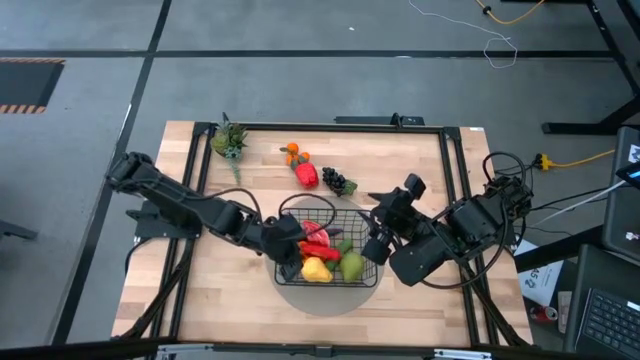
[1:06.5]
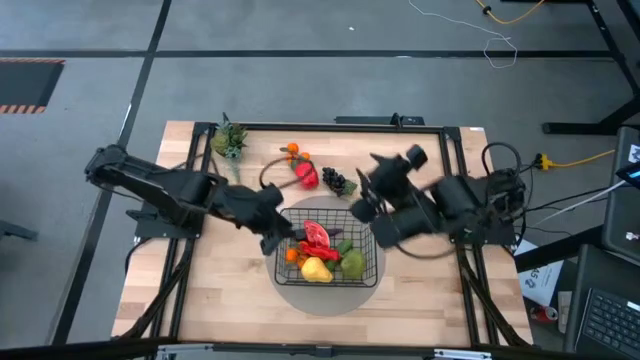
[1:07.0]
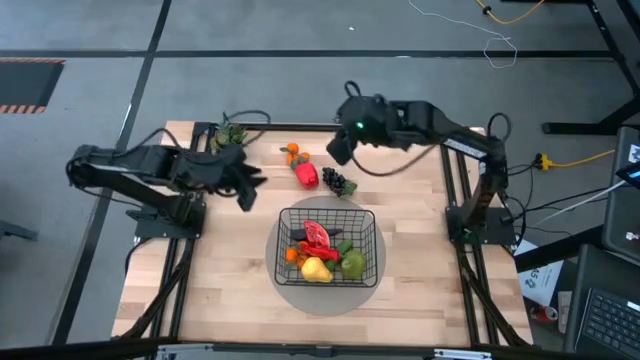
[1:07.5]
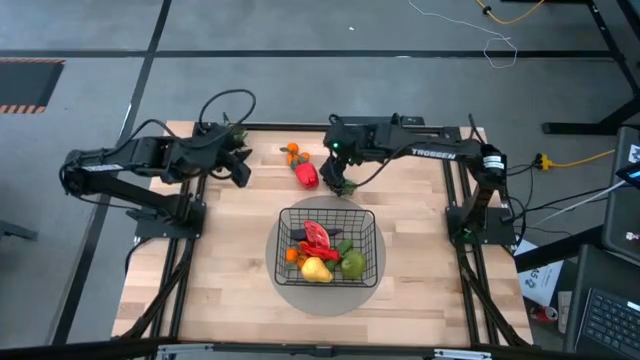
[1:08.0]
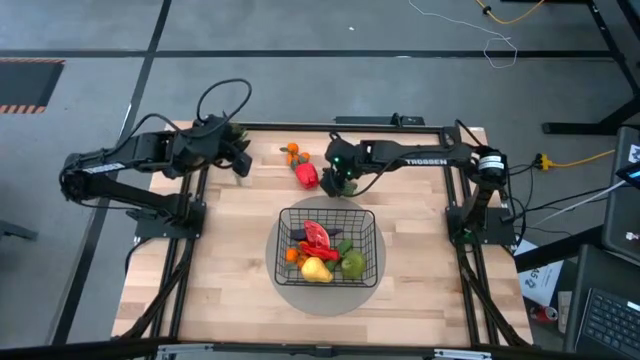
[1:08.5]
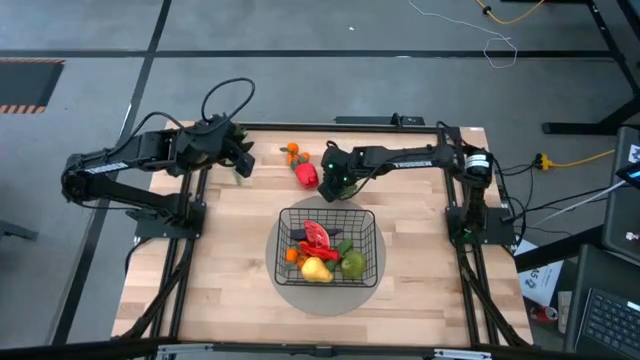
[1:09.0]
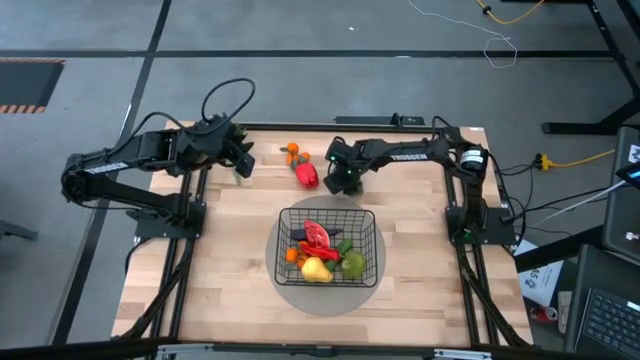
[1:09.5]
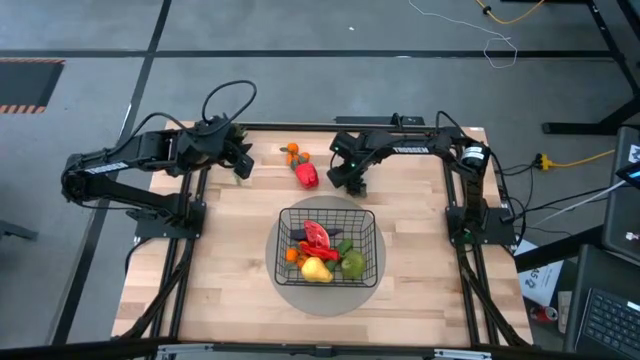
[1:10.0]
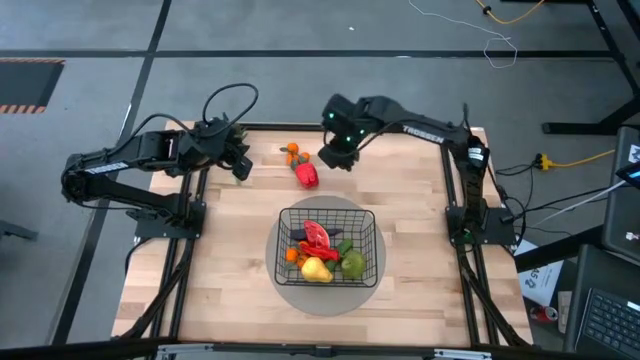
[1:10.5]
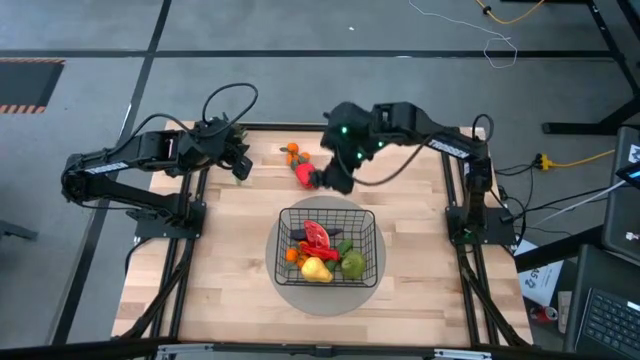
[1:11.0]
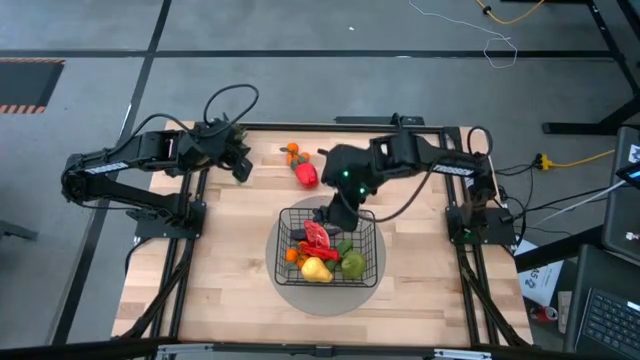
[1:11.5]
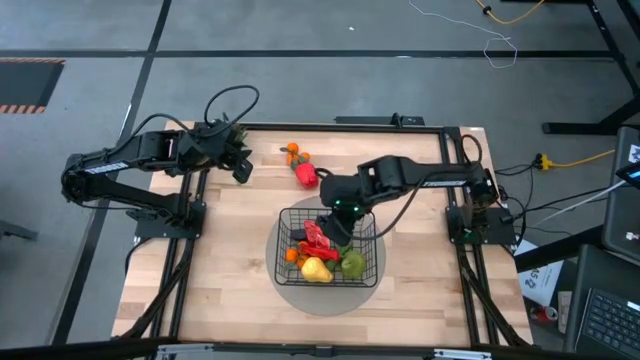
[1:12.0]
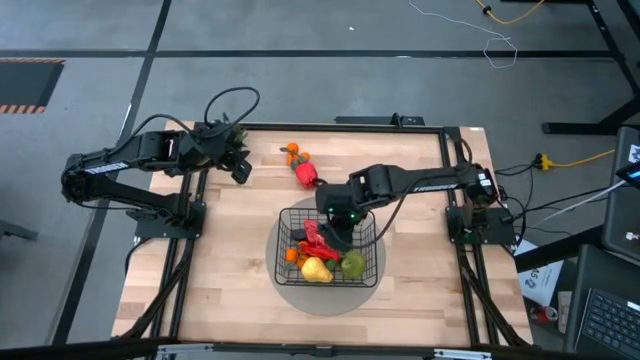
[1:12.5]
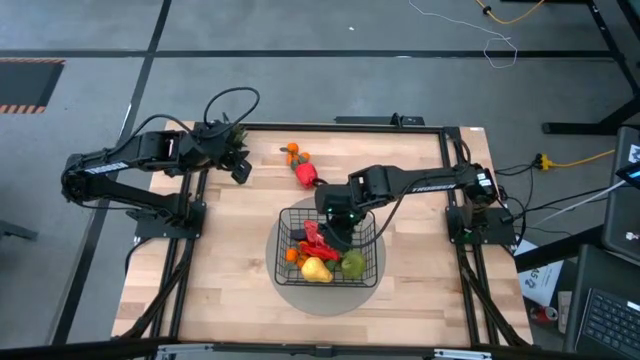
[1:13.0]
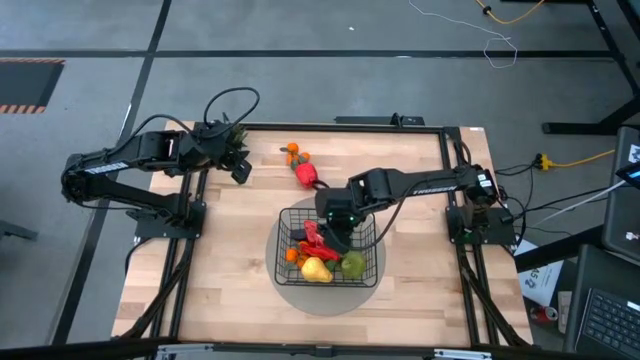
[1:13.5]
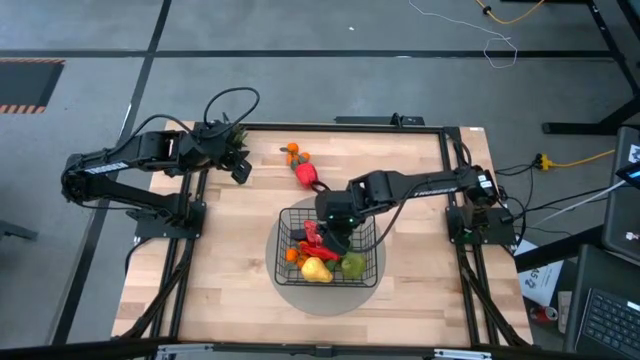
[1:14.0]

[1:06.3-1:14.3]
Task: Build produce basket
Put the black grapes into the black wire basket

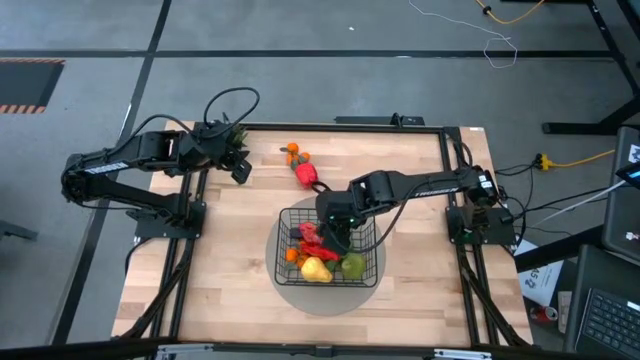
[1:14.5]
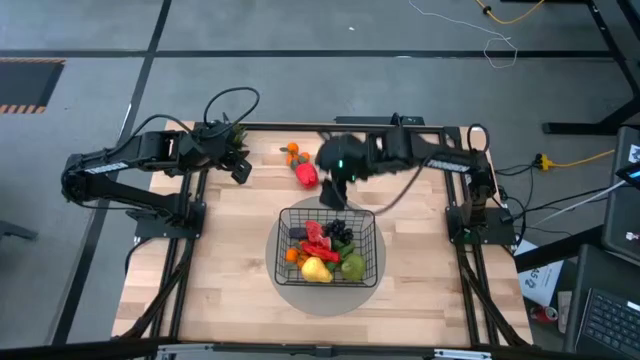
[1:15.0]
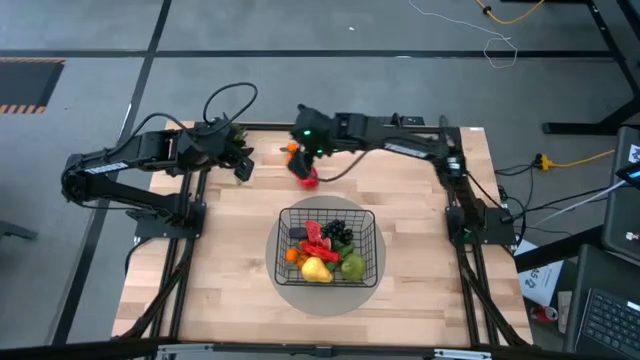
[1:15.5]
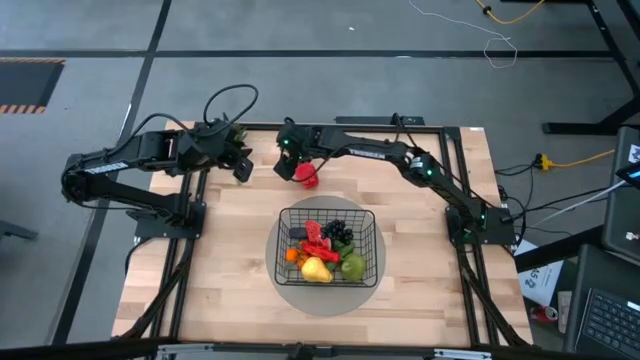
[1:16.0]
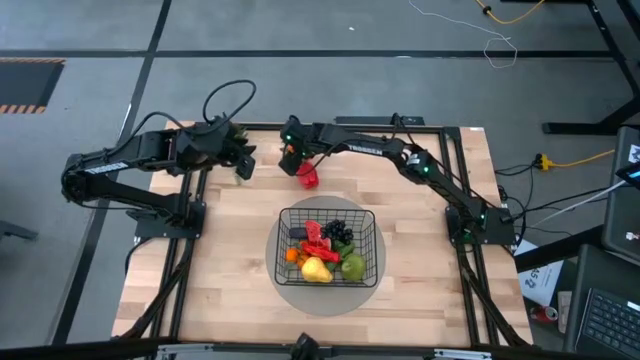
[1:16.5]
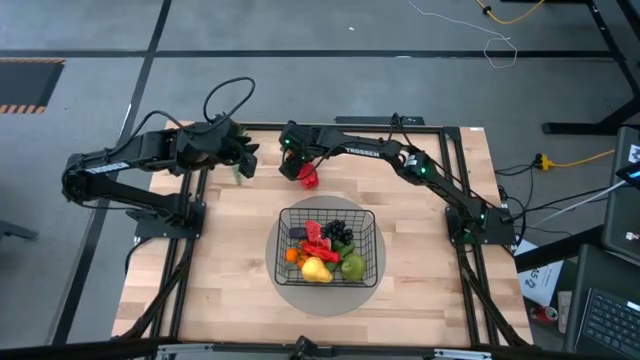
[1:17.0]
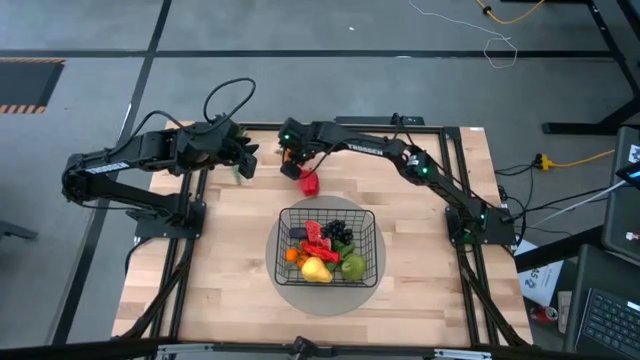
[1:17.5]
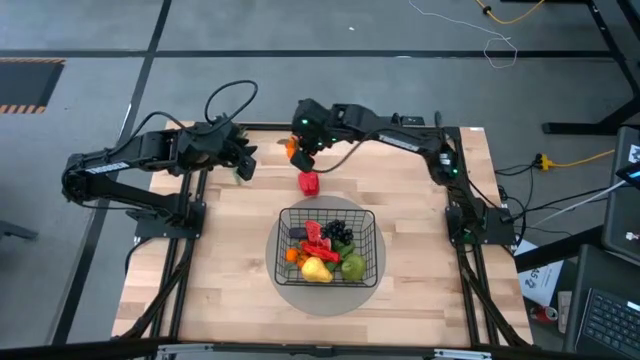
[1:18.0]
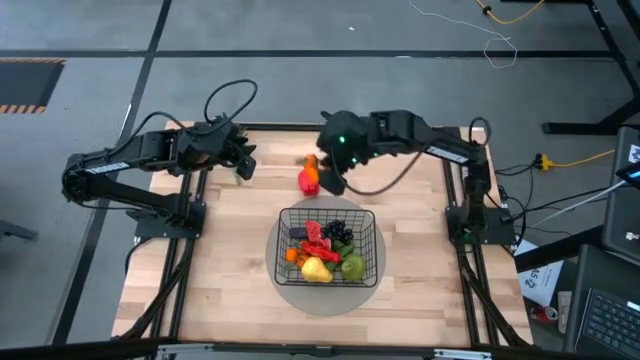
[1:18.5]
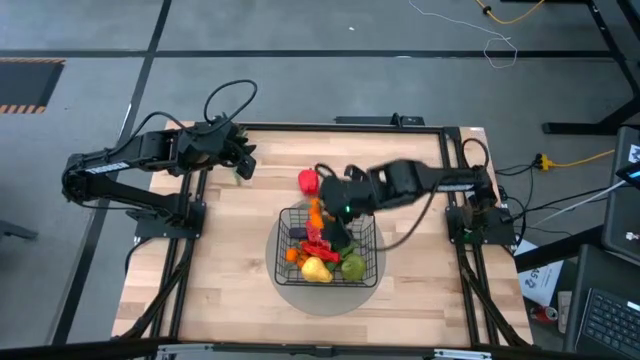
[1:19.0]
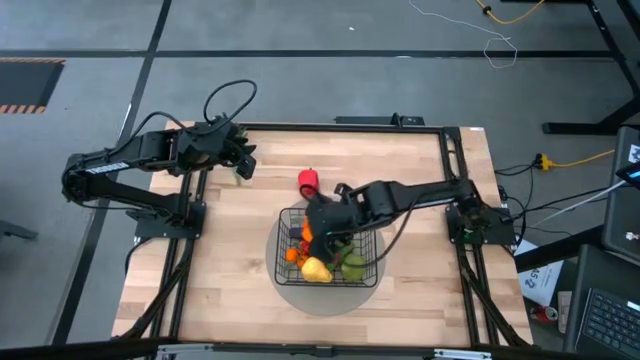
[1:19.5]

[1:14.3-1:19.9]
Put the orange tangerines into the black wire basket

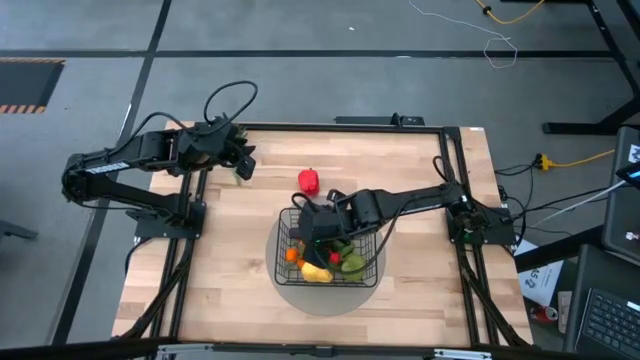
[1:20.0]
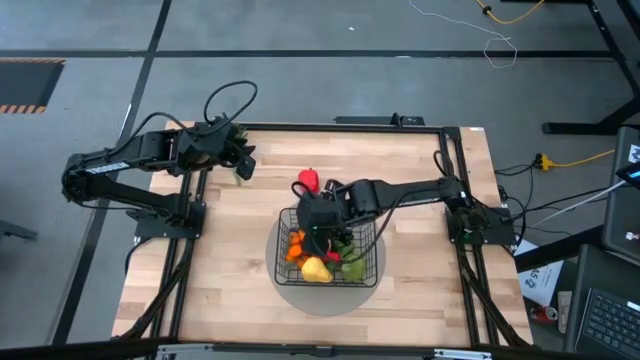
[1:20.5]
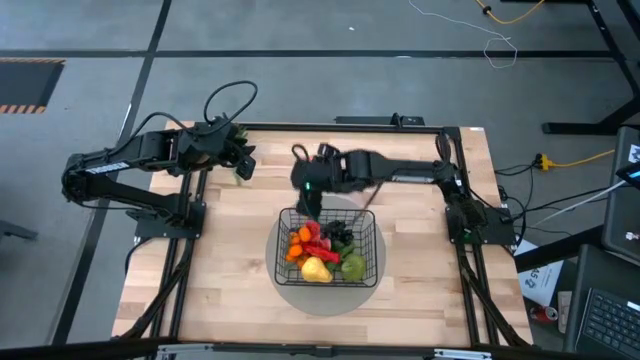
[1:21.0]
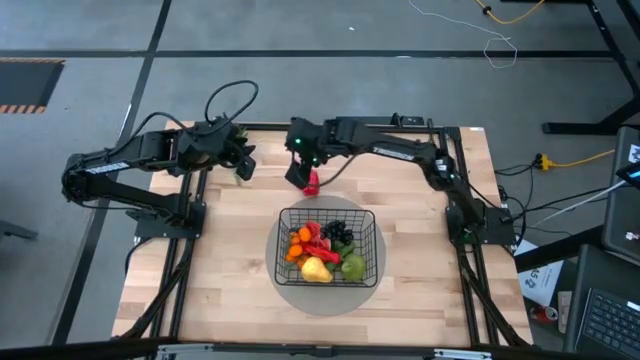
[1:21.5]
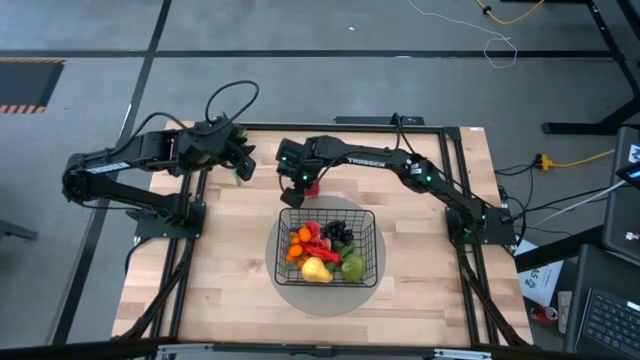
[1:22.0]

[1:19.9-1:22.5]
Put the red bell pepper into the black wire basket

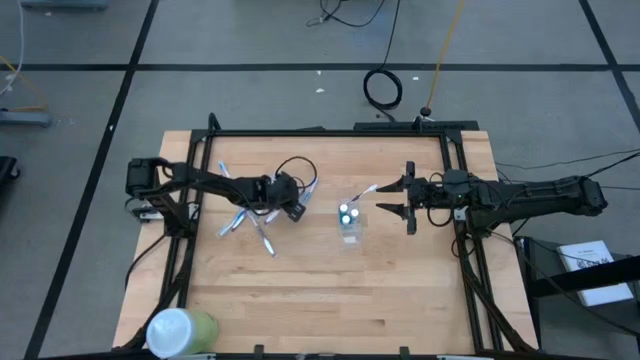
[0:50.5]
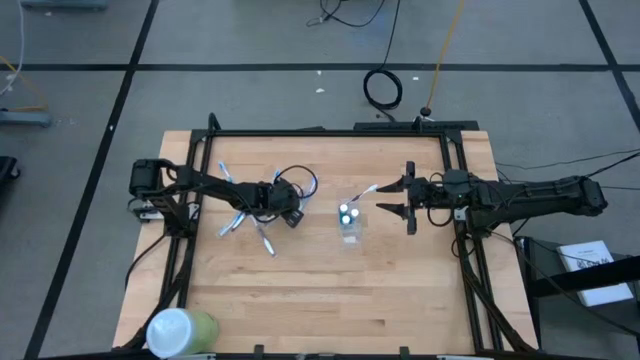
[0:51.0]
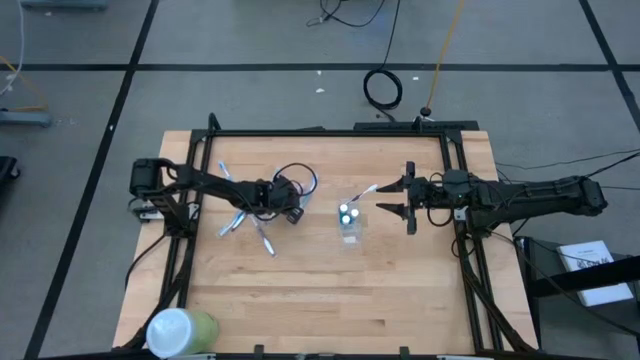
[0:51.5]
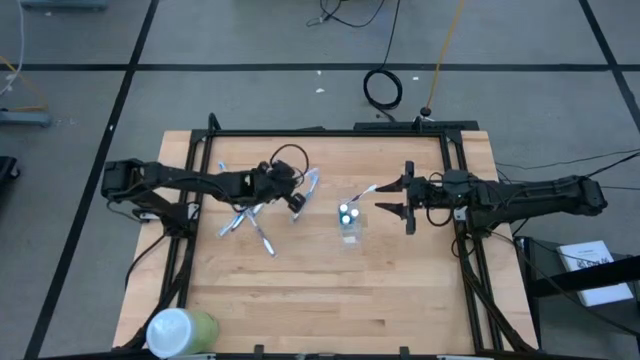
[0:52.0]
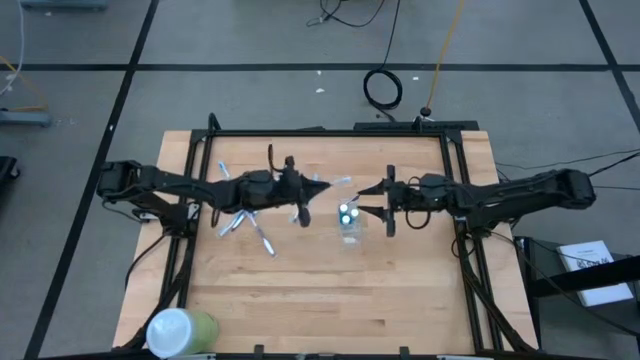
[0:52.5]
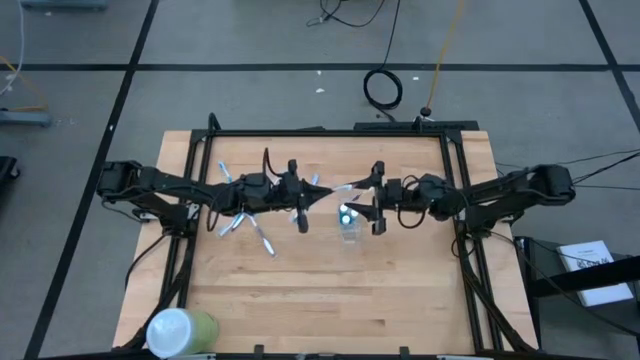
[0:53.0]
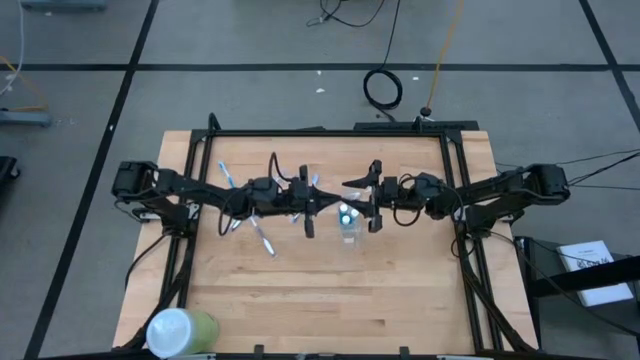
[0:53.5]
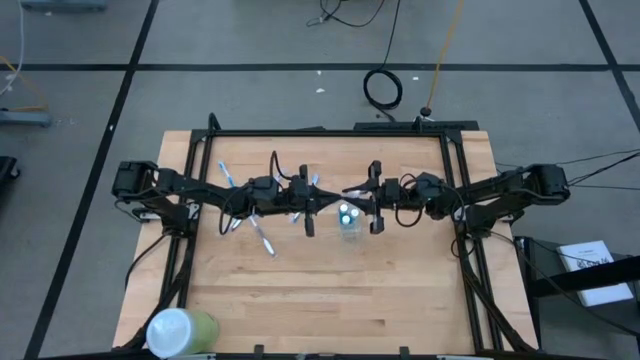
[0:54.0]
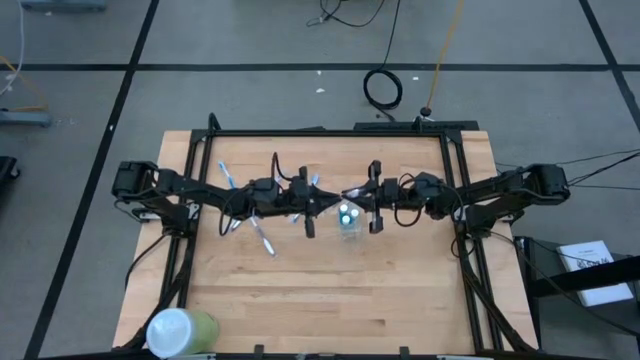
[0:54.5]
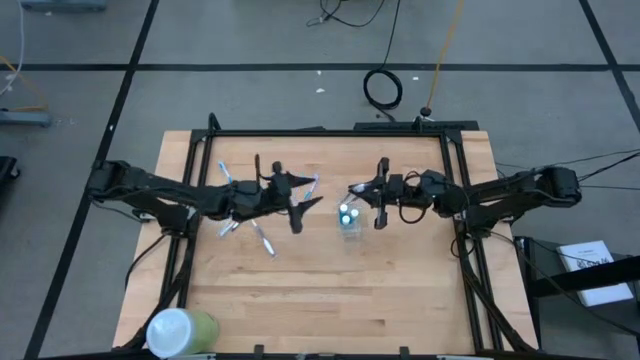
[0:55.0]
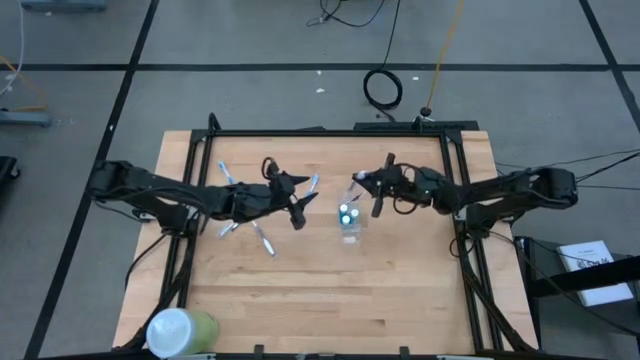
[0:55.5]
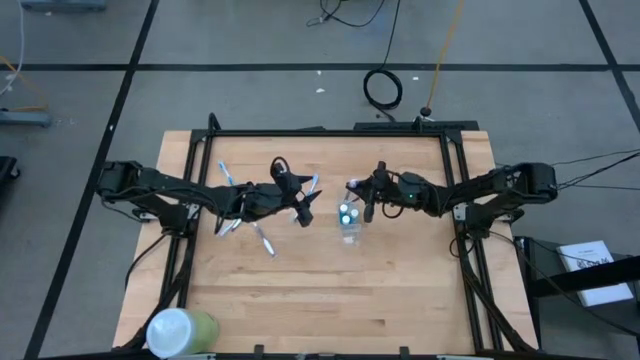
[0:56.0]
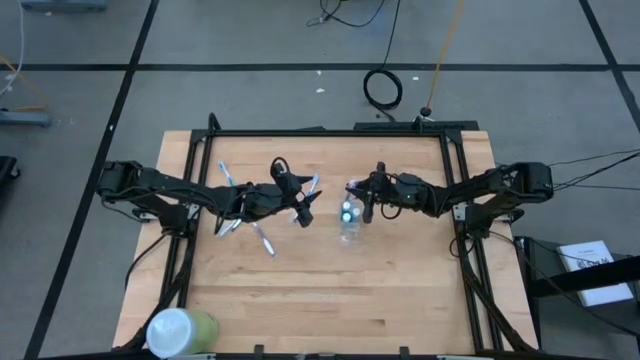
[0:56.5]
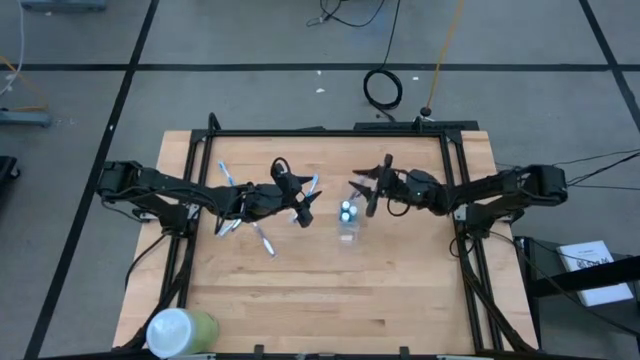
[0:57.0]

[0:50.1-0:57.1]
Task: Pick & Place toothbrushing station
Put the violet toothbrush into the transparent organizer
